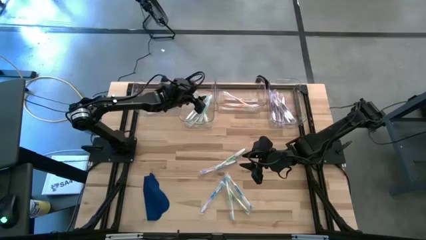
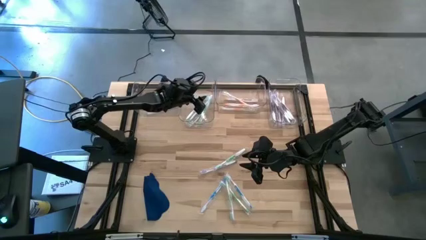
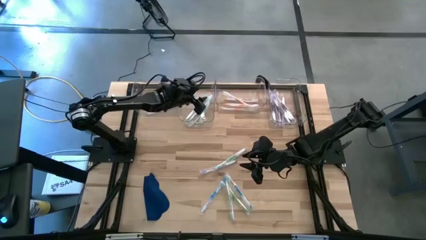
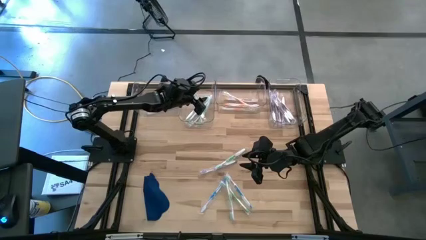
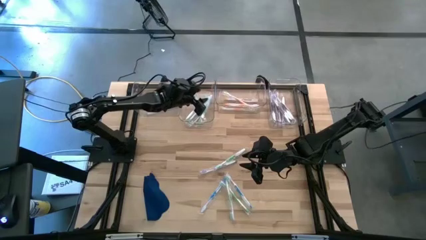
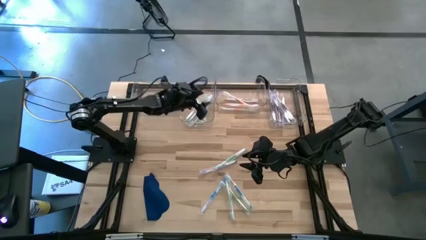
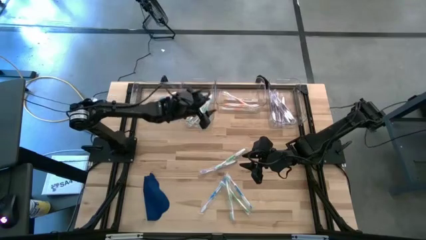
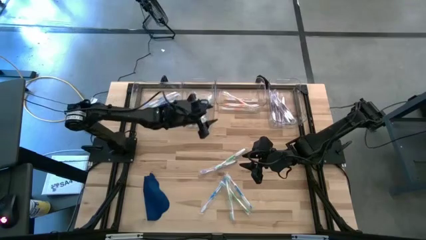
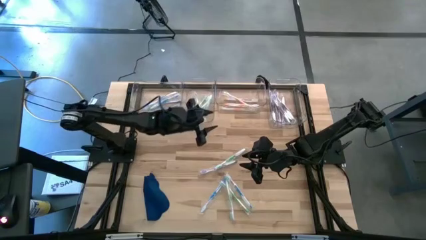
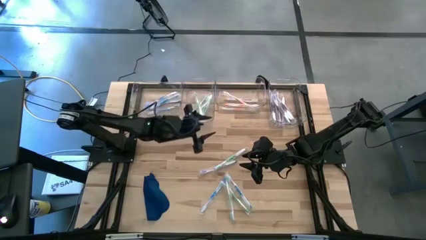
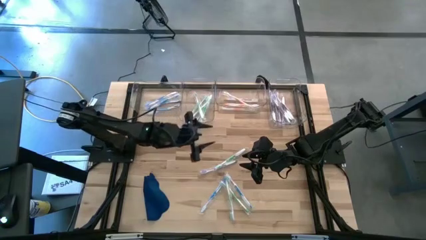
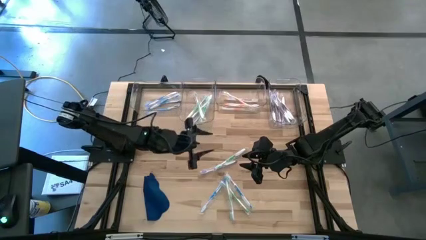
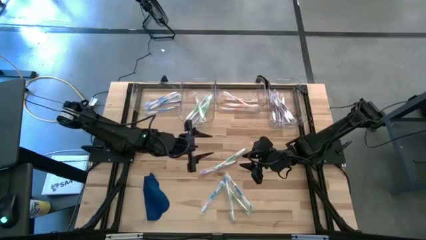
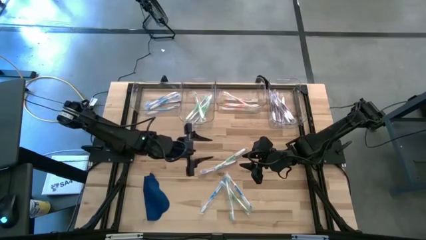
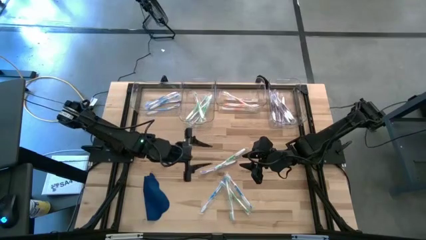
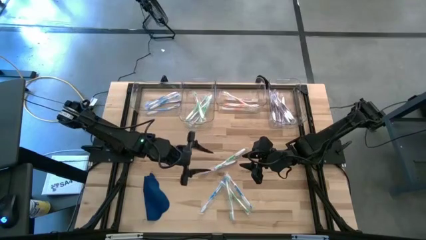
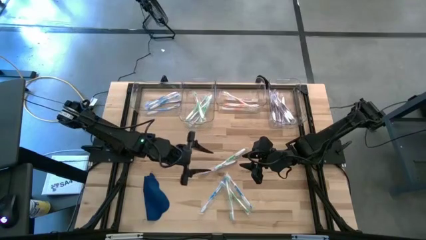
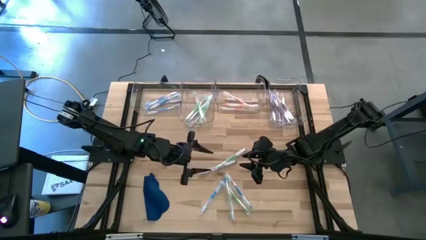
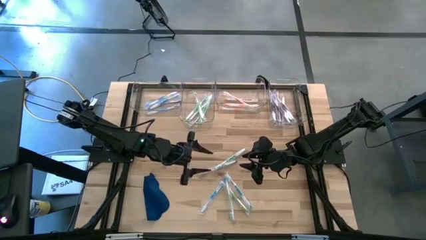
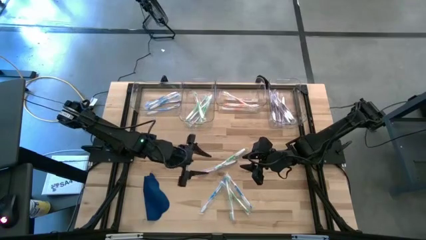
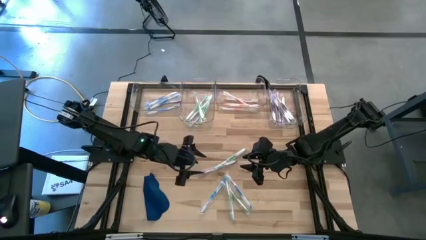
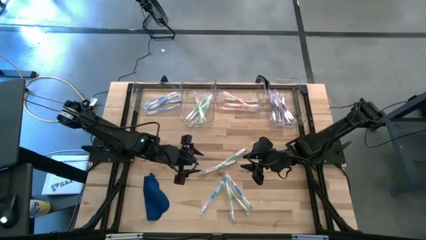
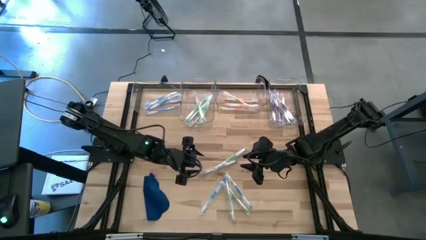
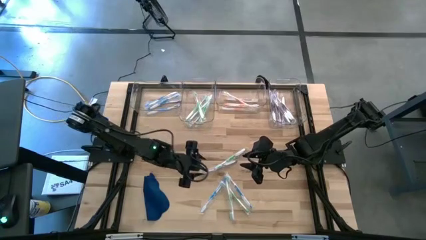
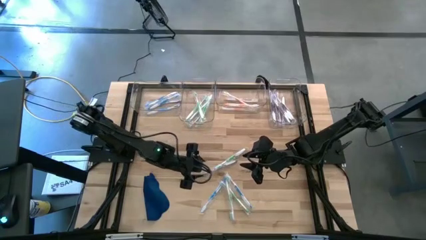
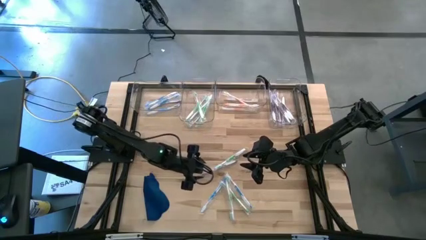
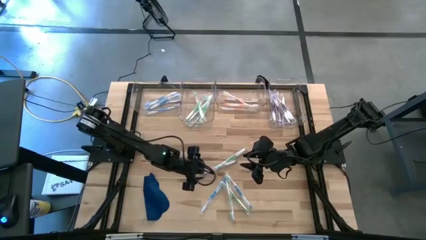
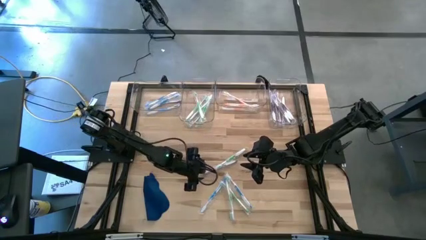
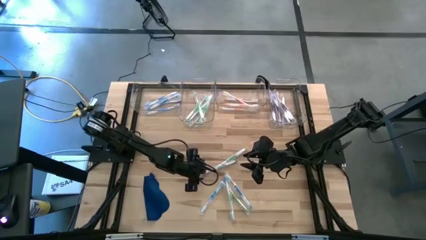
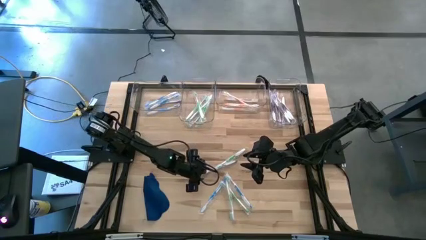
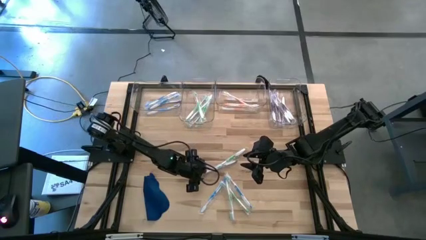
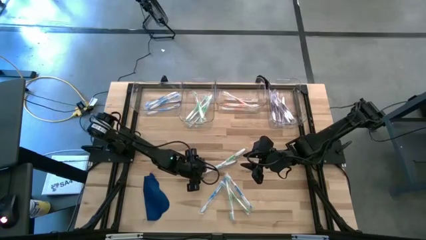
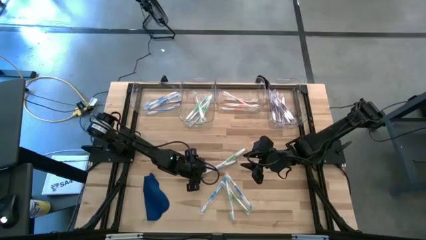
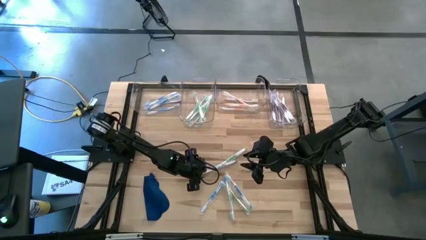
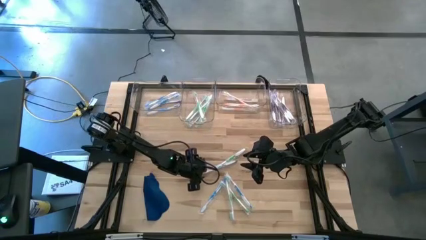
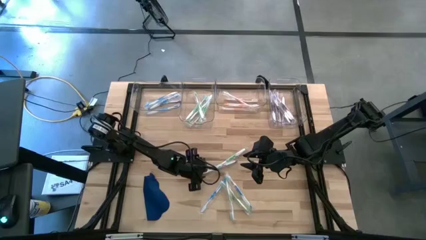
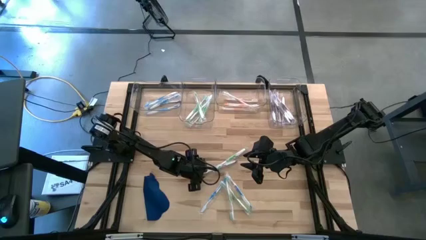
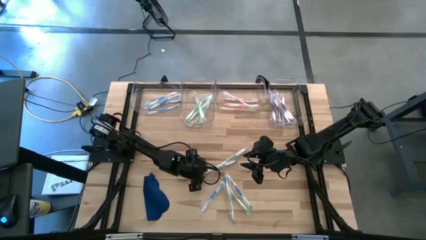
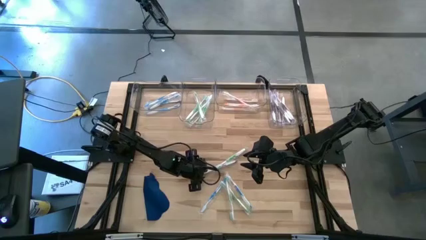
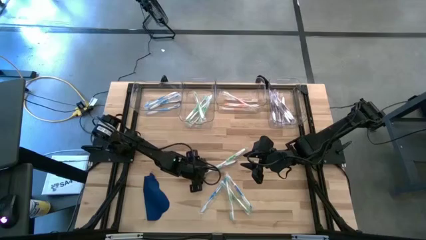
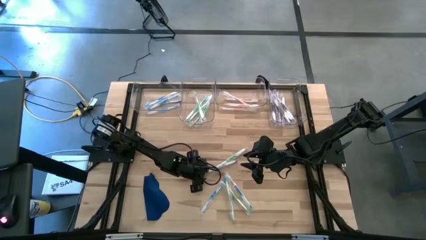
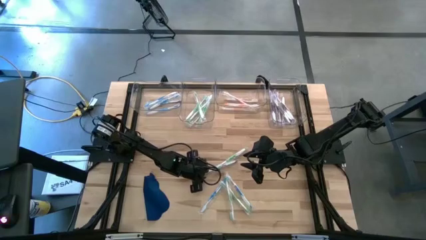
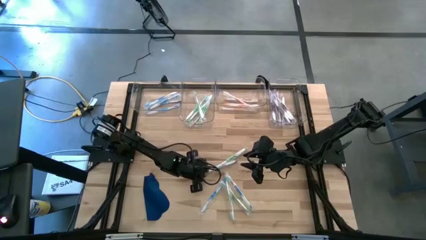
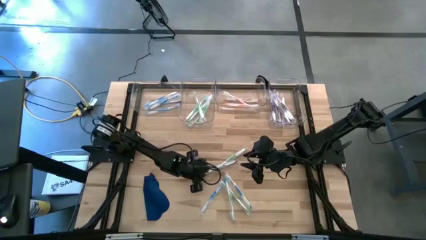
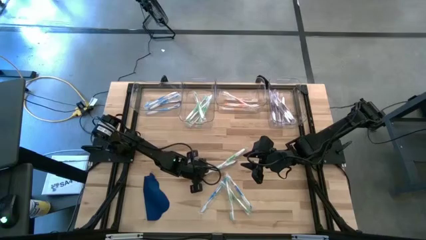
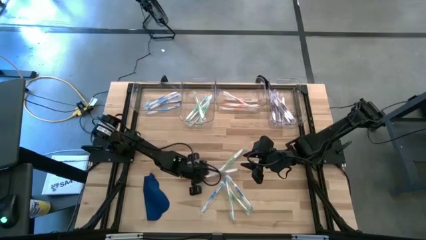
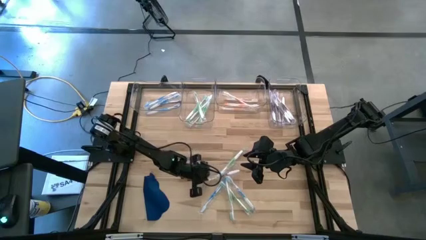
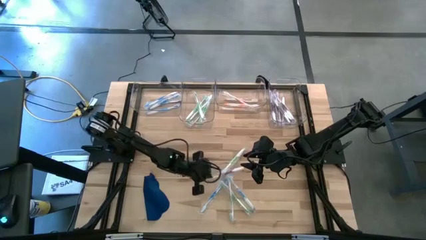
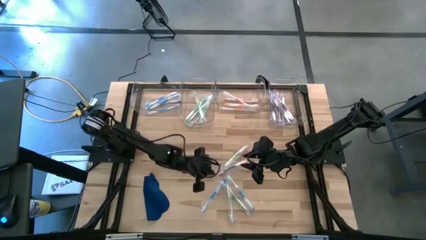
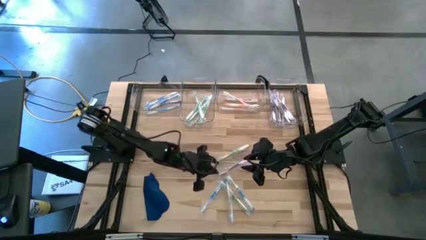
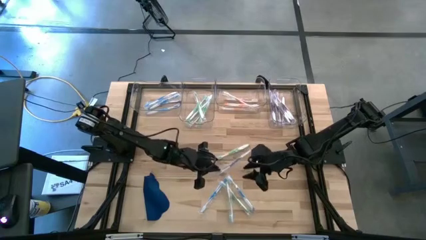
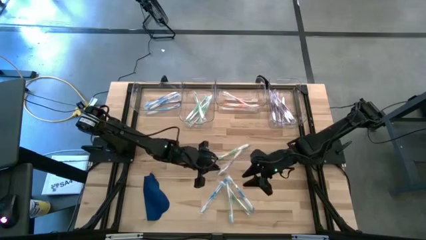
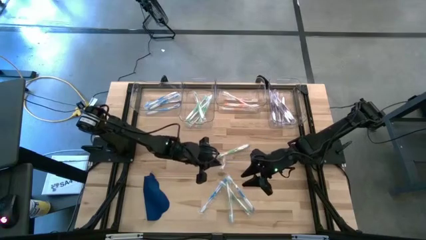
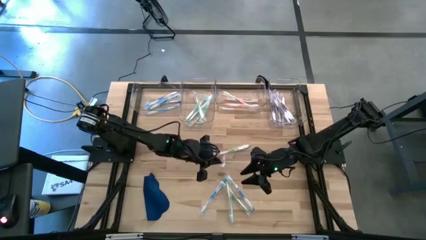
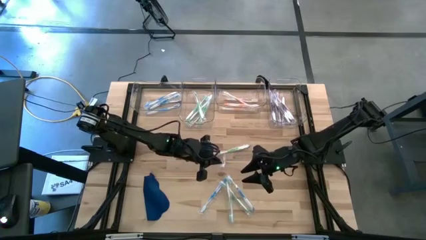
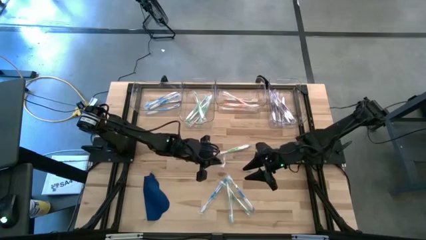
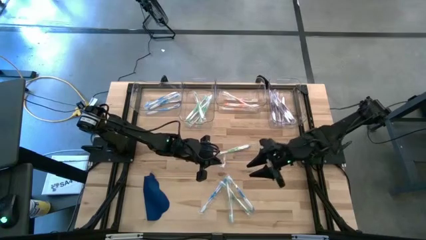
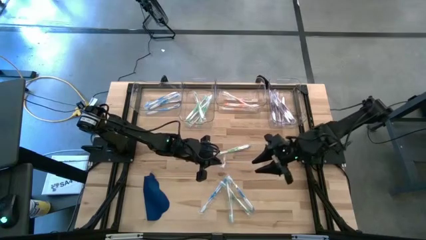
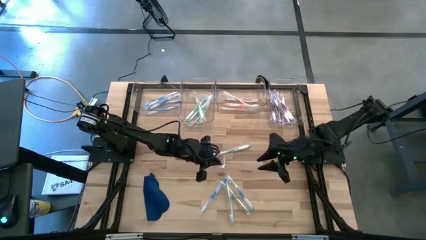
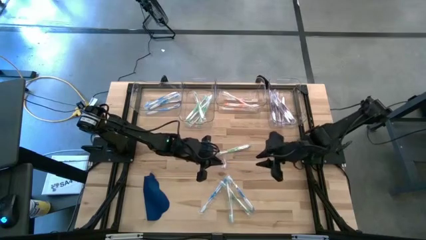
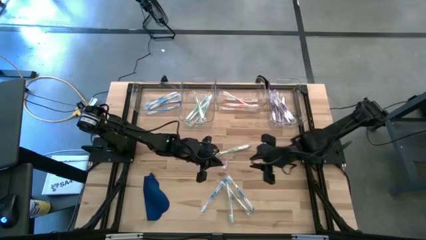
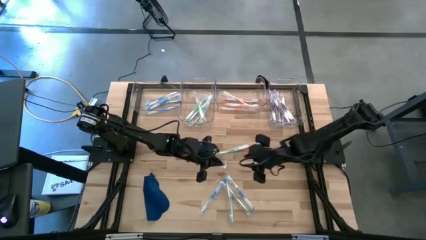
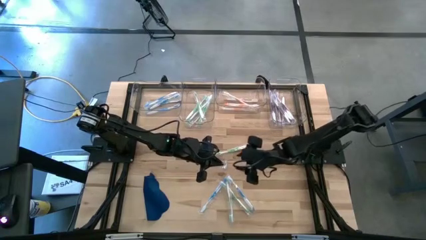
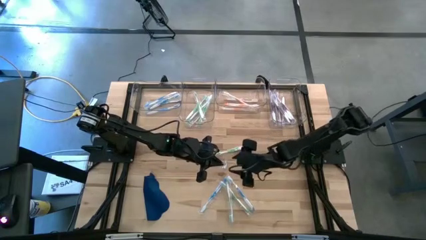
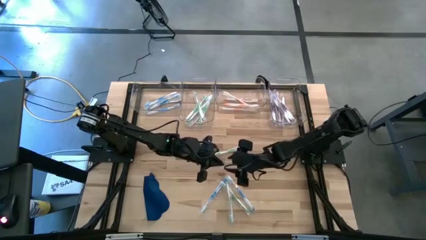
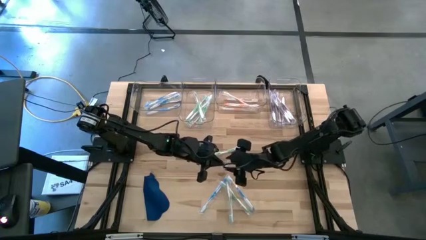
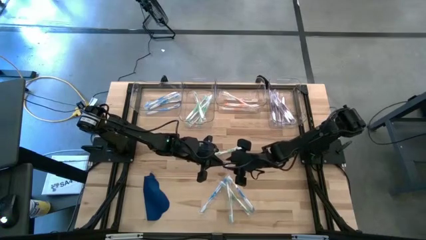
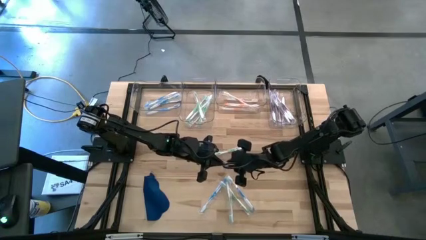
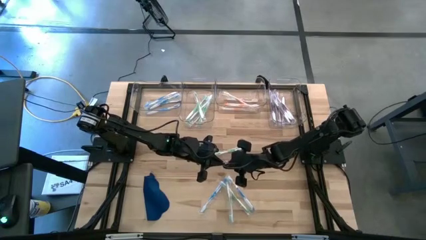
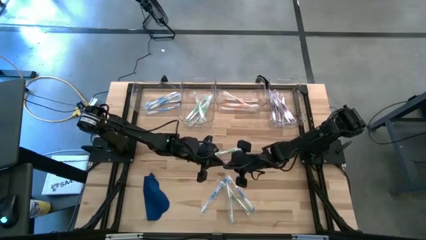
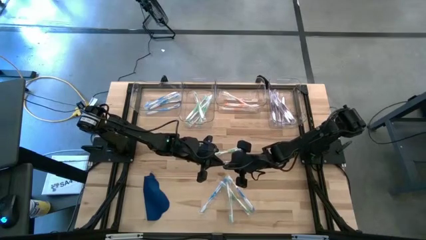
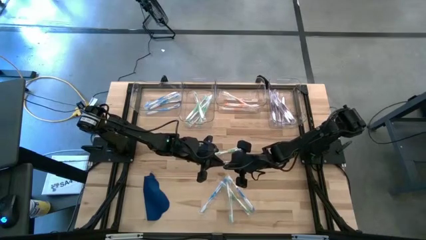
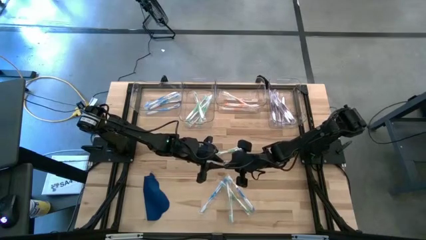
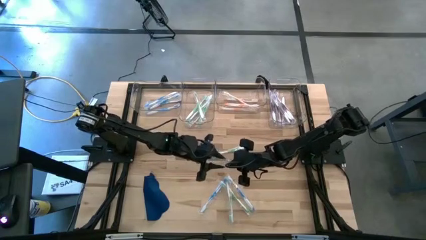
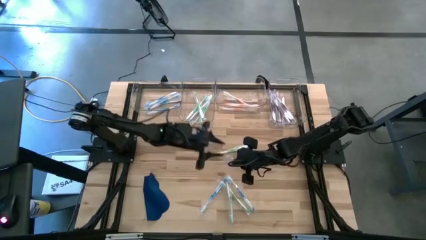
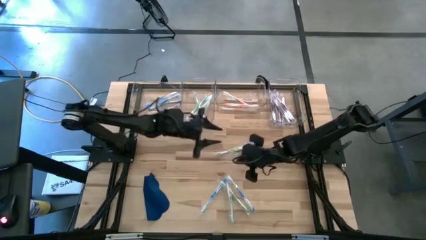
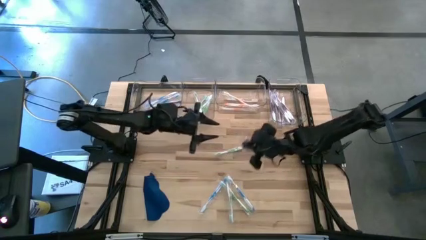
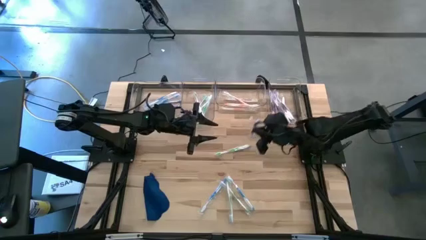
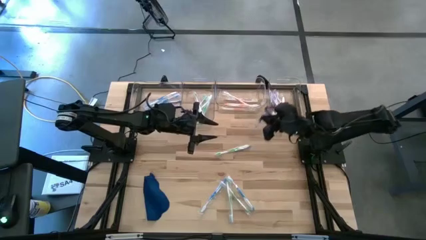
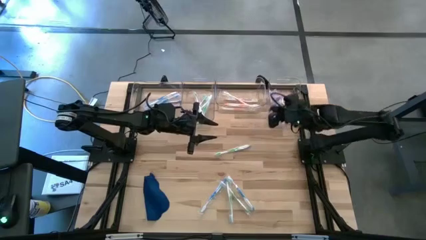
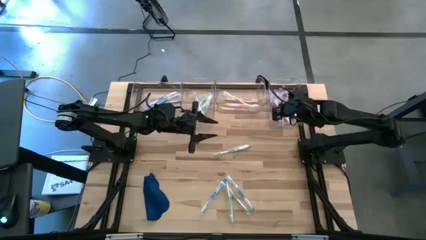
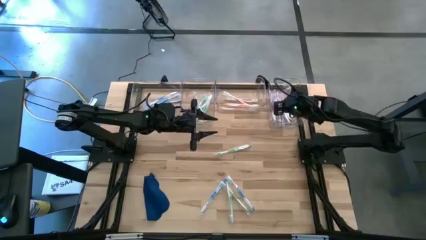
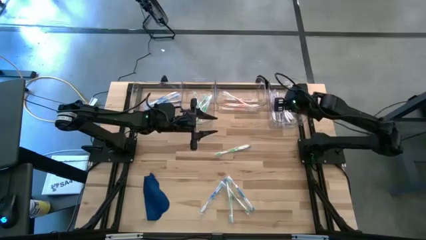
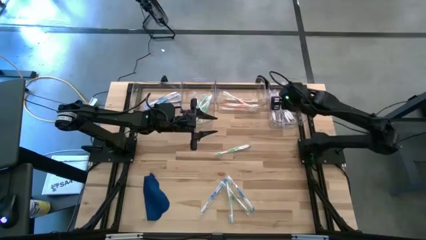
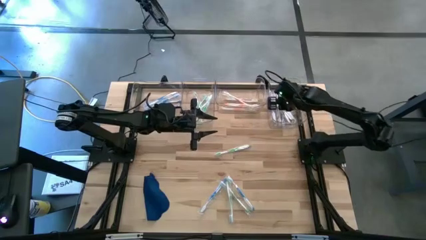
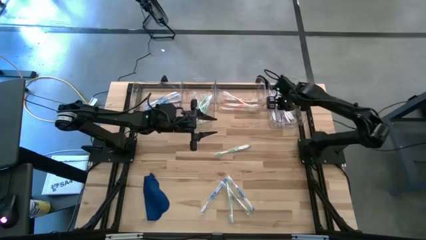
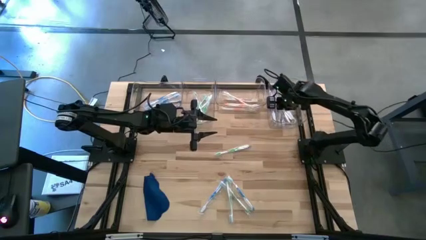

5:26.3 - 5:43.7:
Task: Pick & Place Toothbrushes
Put the purple toothbrush into the right transparent bin
